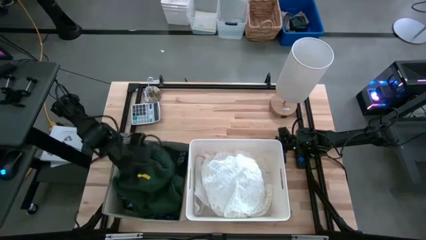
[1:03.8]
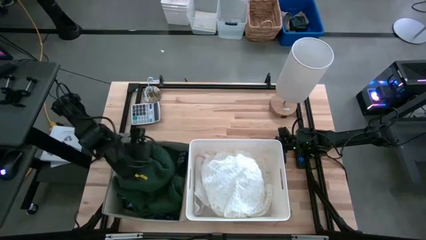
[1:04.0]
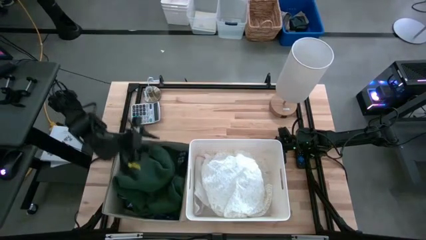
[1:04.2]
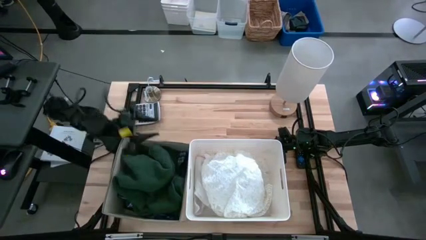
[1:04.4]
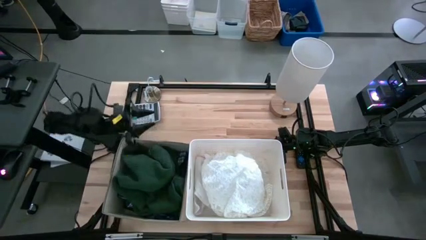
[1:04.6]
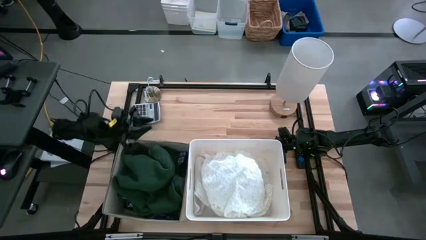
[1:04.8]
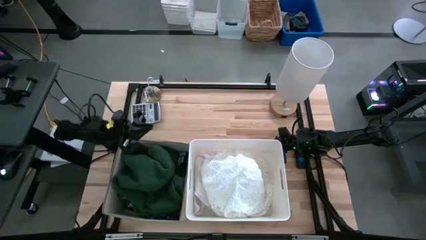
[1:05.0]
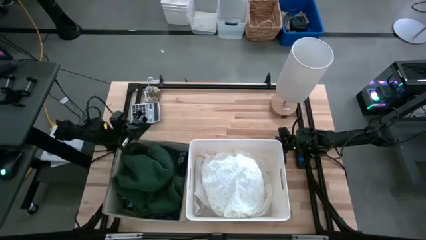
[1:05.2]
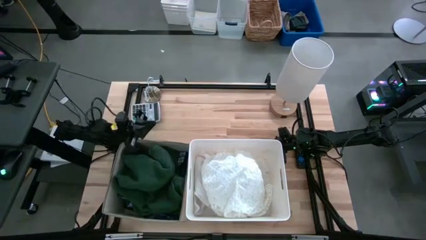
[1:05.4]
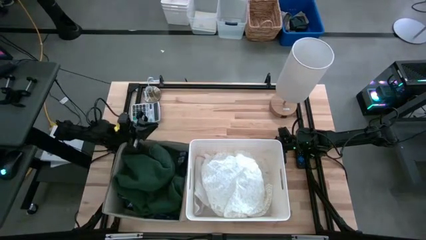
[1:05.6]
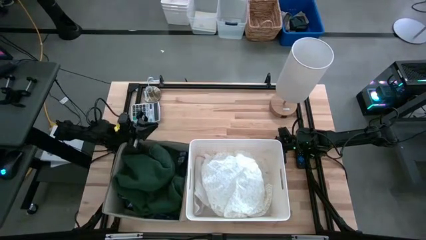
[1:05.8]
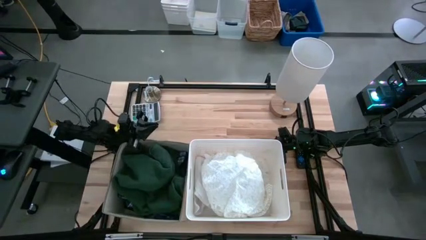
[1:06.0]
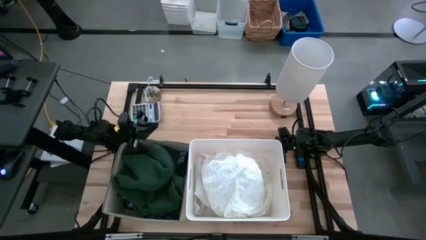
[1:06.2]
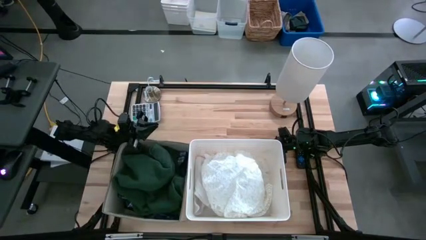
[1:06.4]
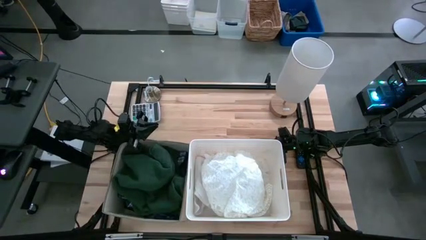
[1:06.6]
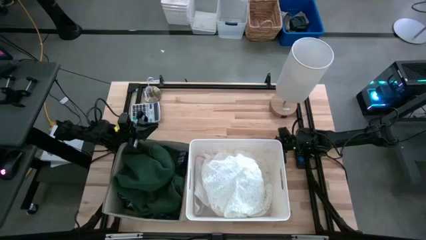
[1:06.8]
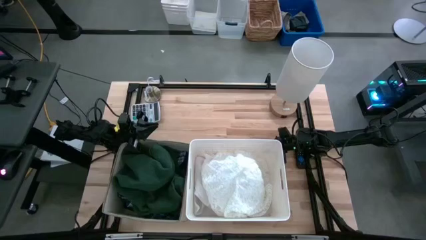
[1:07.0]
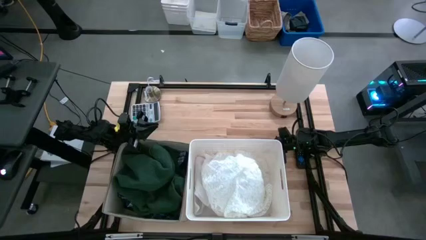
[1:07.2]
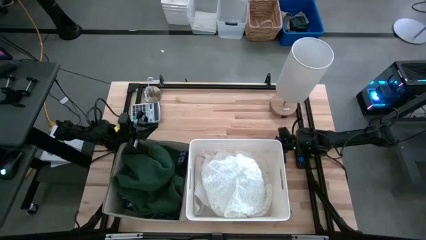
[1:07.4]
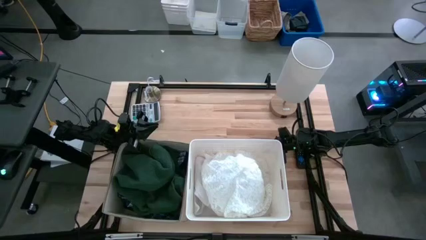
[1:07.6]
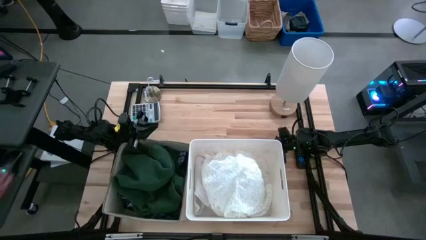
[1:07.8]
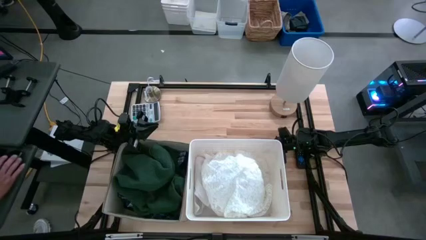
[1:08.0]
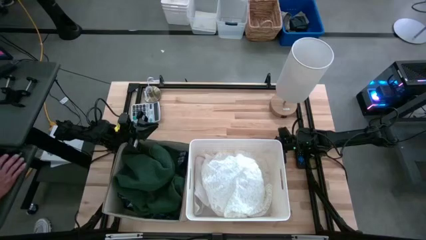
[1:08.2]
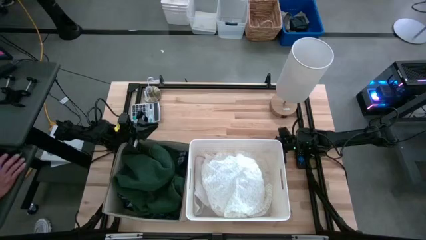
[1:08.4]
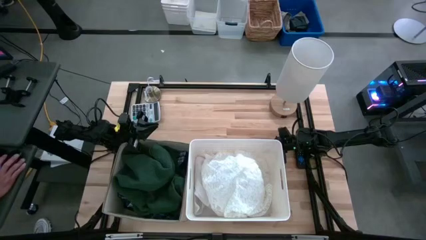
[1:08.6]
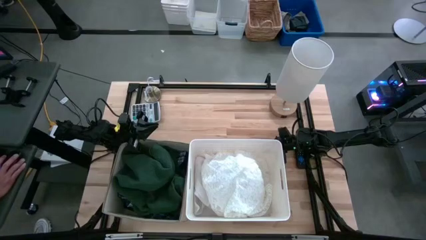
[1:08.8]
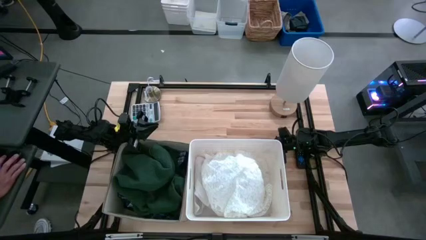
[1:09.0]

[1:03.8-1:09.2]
Task: Sort clothes
Return to Home Position

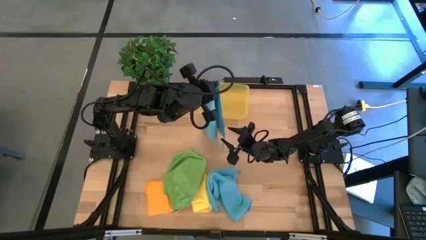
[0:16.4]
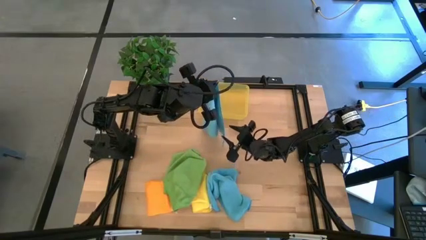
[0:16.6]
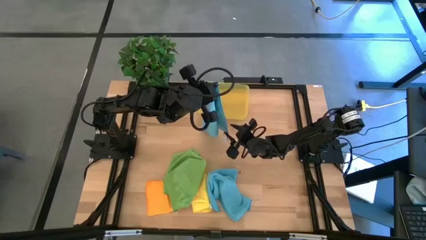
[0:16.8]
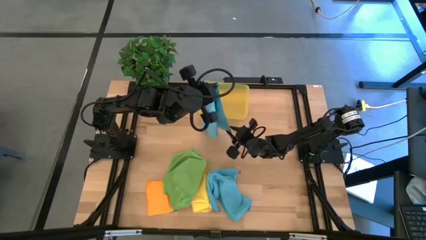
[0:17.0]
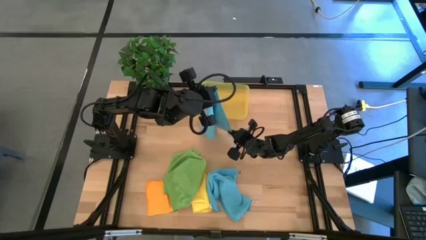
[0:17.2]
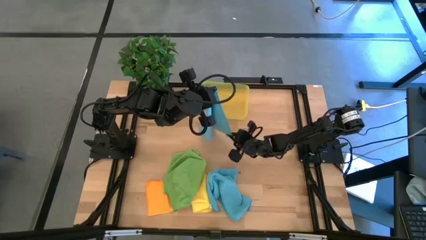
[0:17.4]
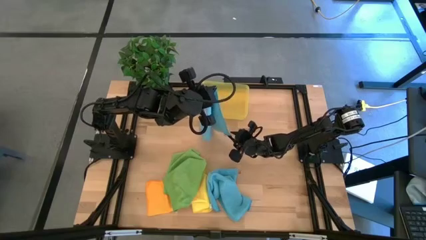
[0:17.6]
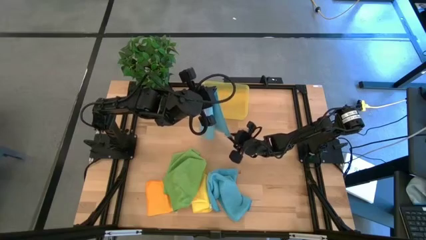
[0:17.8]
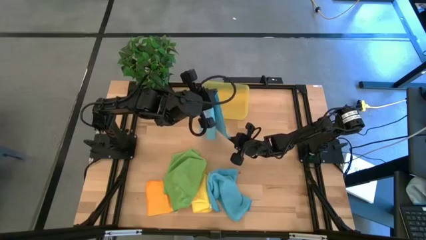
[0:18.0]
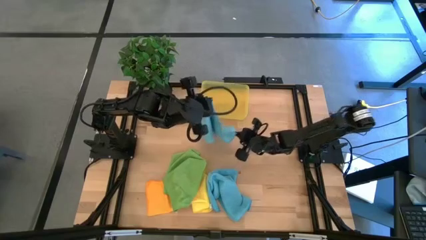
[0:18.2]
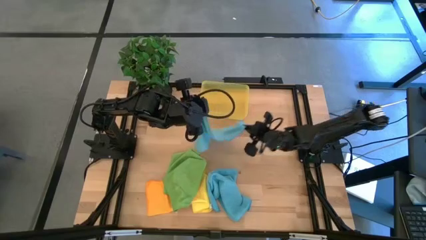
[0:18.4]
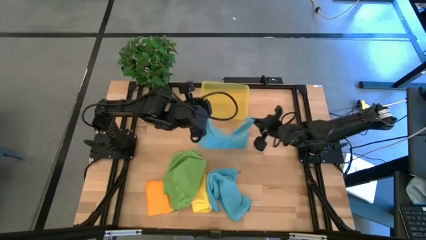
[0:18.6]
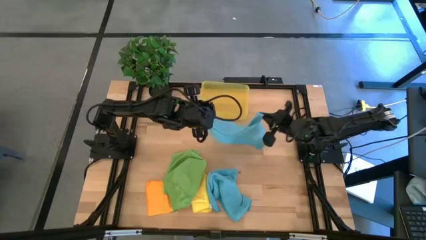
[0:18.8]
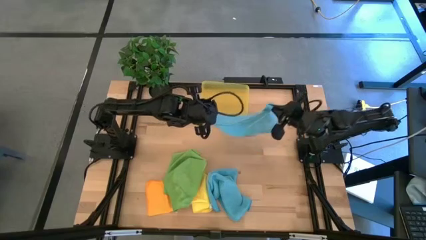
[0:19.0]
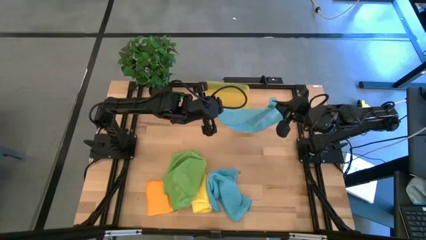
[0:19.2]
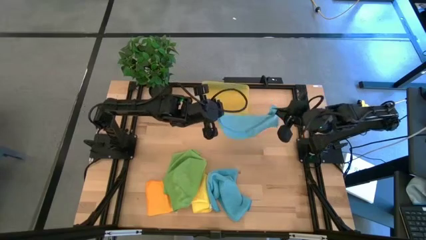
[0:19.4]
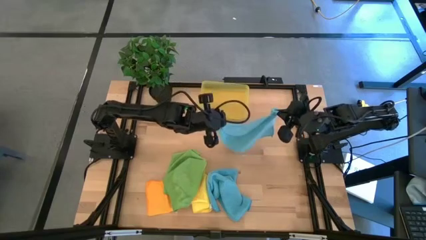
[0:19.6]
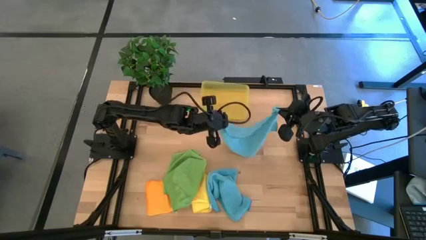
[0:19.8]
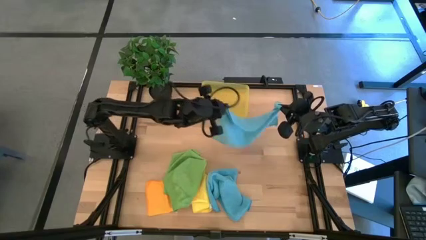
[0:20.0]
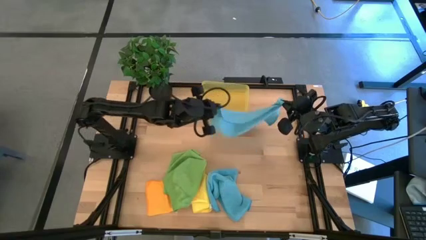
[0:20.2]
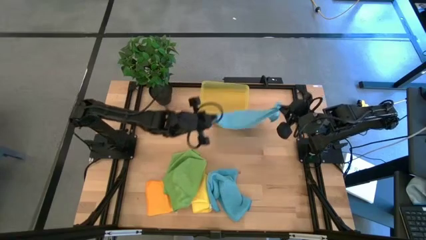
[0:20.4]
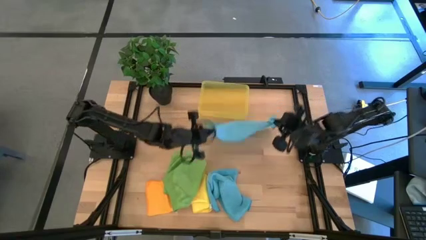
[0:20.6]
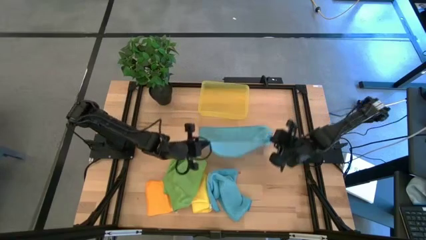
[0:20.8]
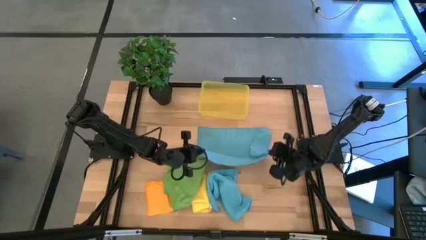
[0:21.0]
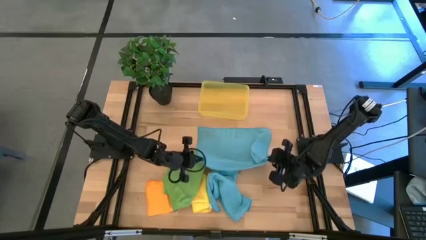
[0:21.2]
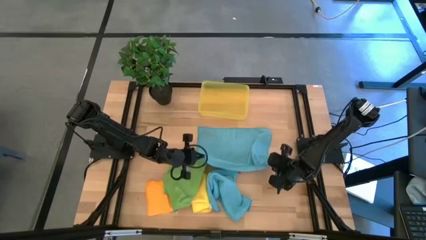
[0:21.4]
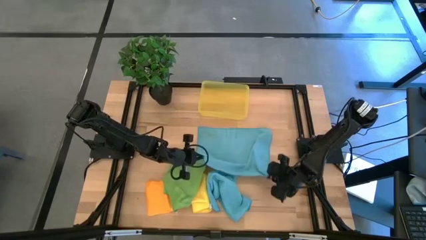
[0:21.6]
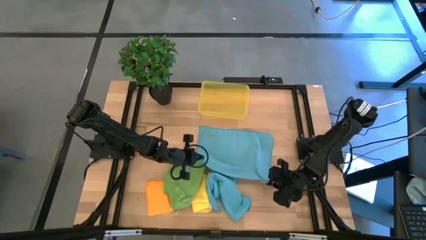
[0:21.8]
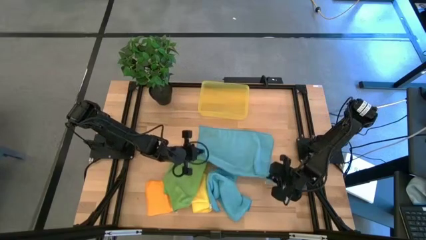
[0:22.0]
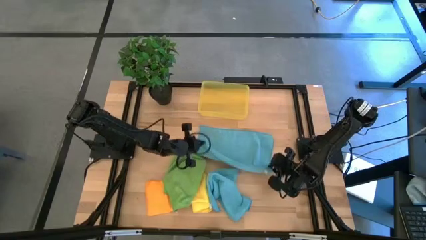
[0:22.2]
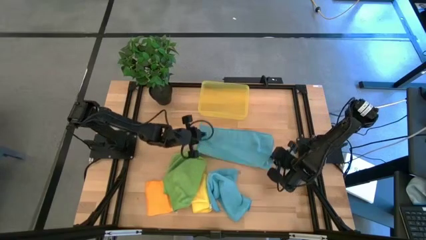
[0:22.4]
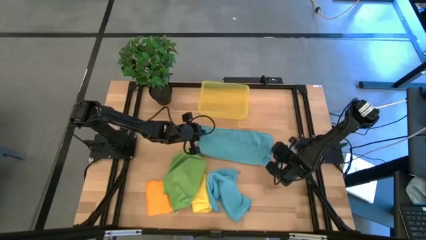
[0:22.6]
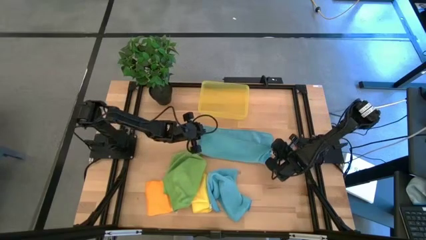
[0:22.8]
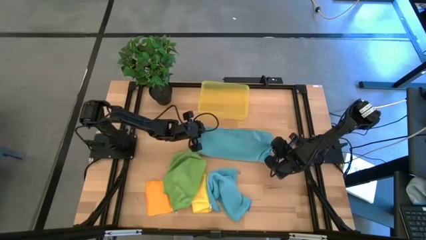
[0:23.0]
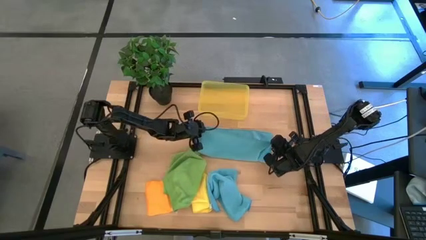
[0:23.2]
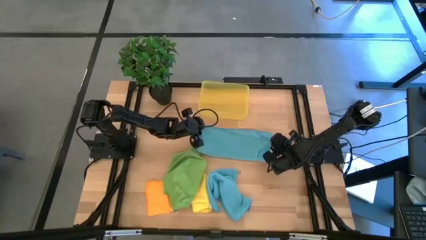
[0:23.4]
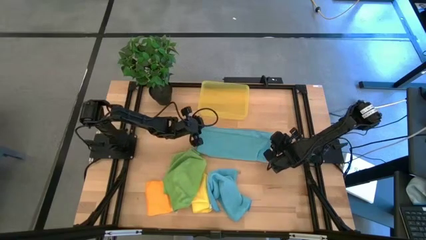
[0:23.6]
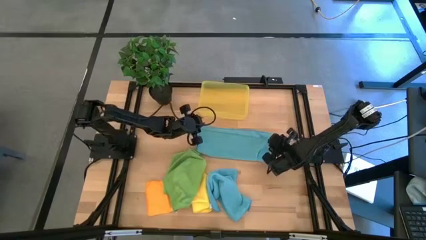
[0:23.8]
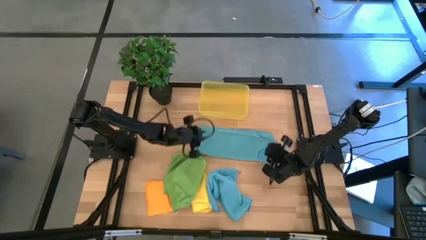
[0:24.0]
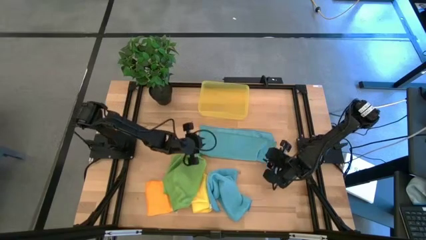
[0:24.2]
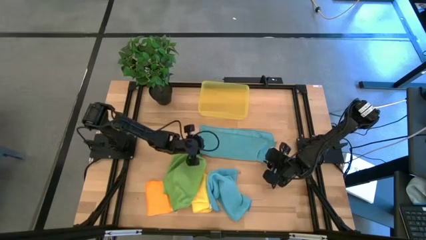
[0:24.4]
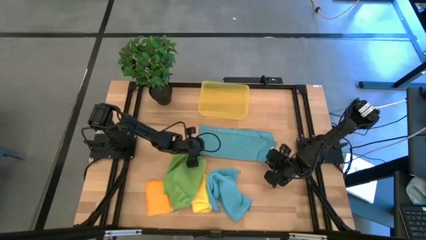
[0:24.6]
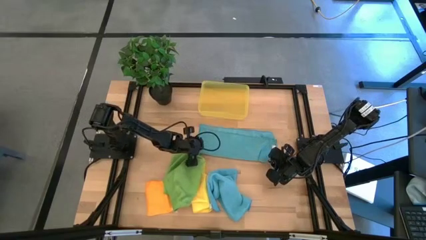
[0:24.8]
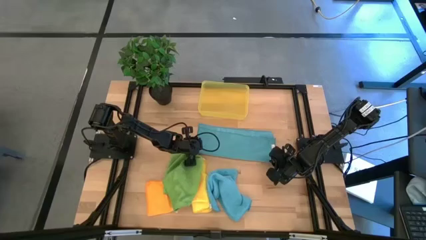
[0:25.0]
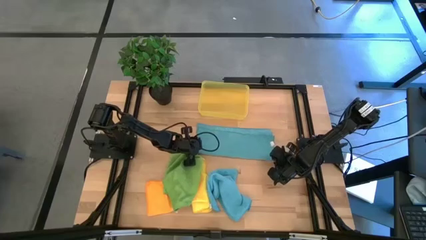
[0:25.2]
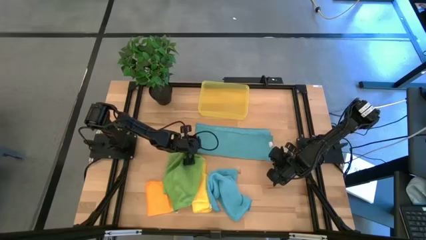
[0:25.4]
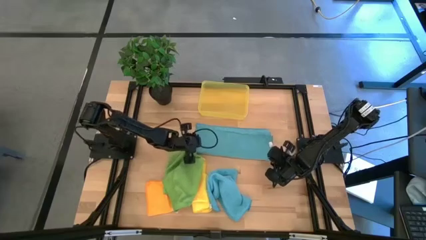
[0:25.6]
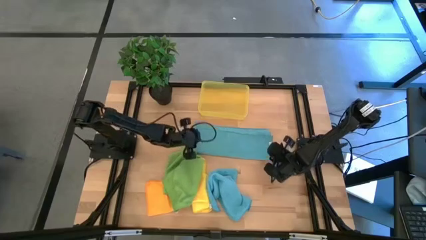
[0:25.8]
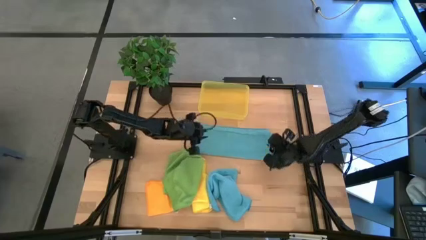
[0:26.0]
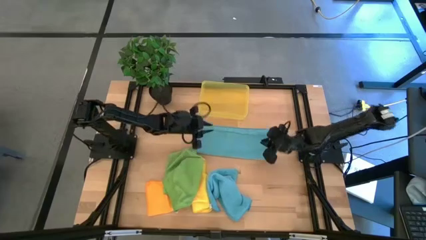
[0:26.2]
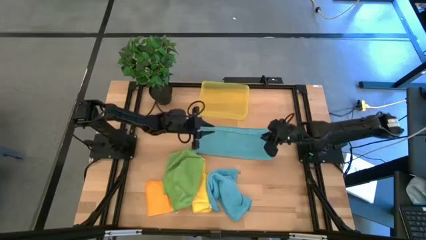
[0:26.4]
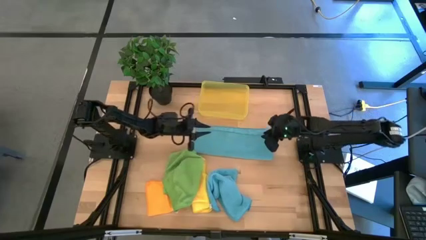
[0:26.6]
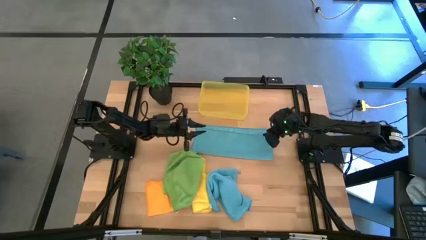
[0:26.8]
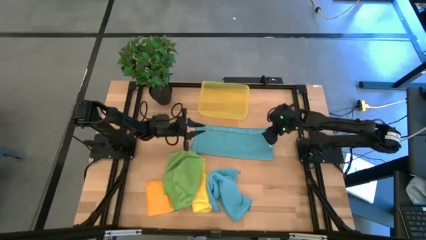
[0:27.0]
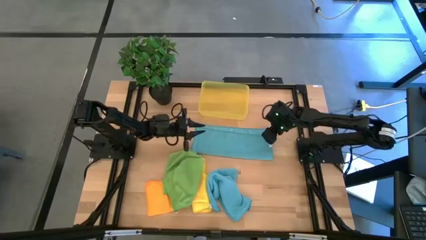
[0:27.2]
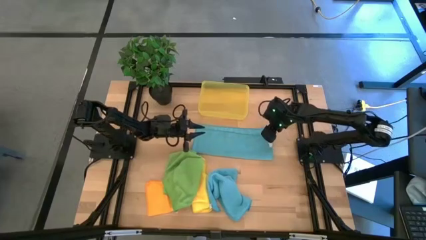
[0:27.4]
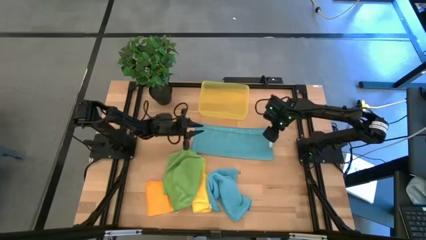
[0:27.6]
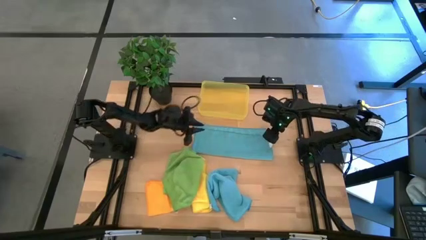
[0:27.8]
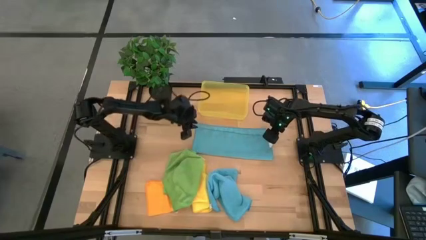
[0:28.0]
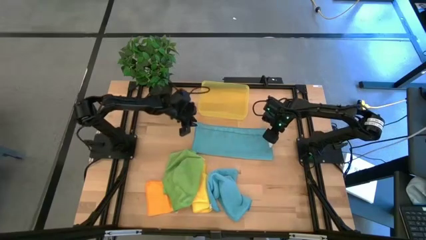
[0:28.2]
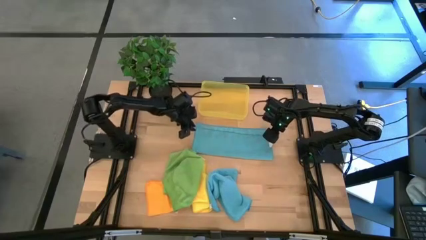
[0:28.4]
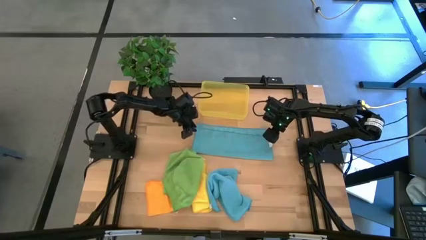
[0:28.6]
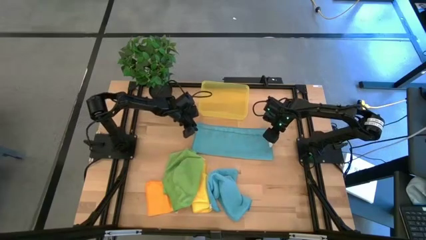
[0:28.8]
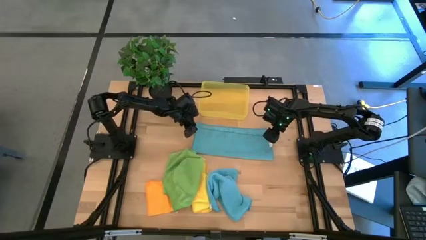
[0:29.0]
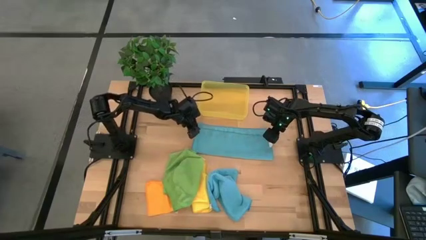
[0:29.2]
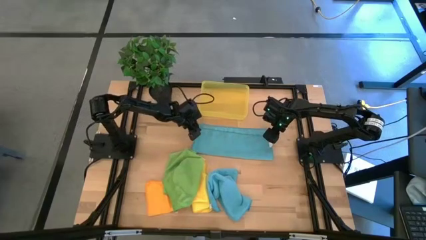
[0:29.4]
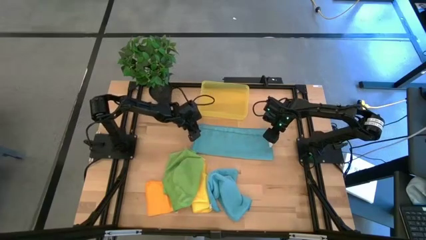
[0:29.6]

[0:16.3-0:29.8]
Task: Fold microfiber towels
Fold the left blue microfiber towel
